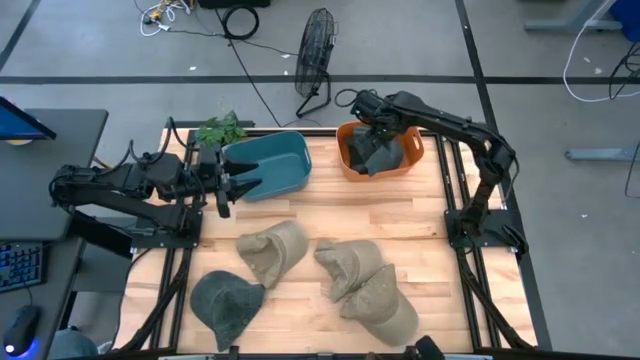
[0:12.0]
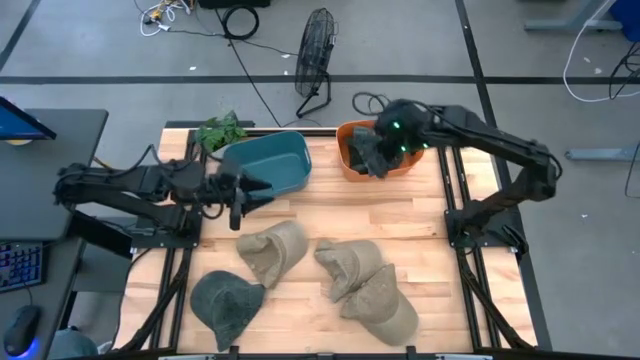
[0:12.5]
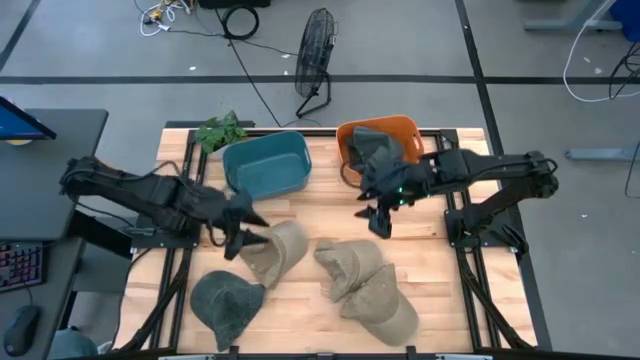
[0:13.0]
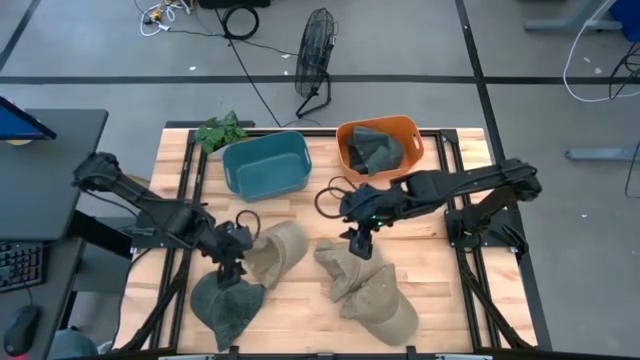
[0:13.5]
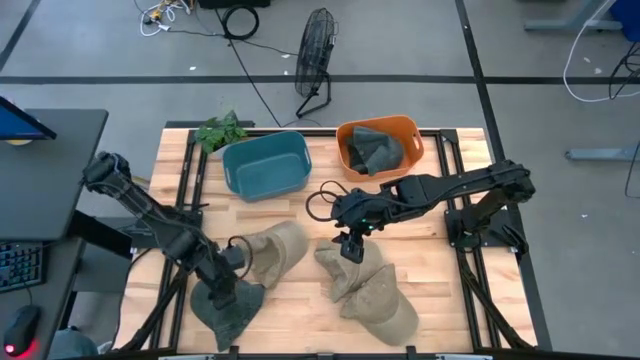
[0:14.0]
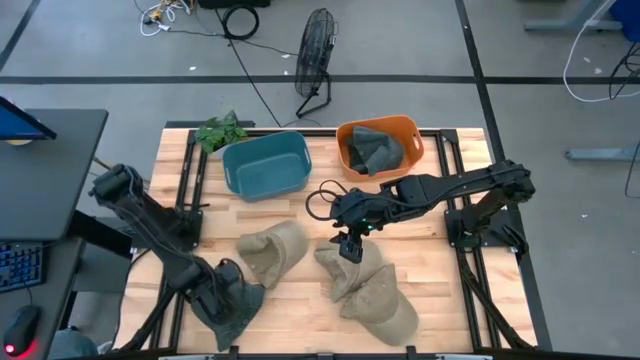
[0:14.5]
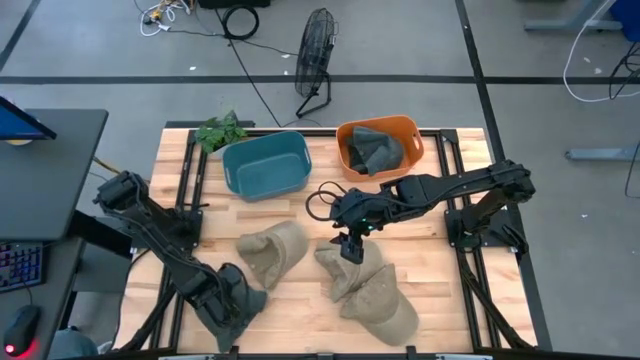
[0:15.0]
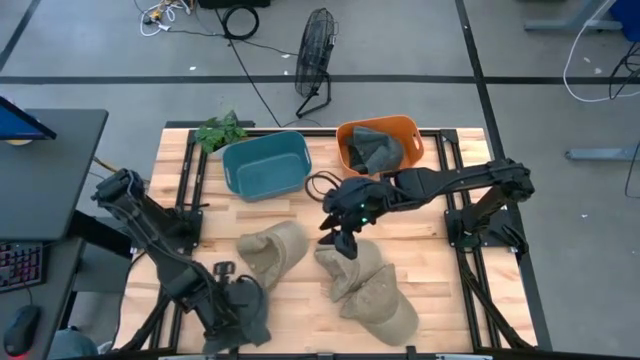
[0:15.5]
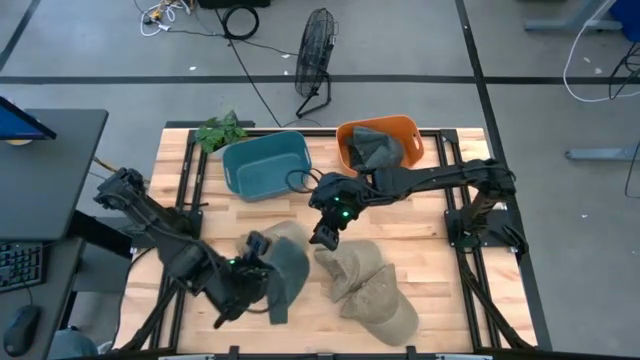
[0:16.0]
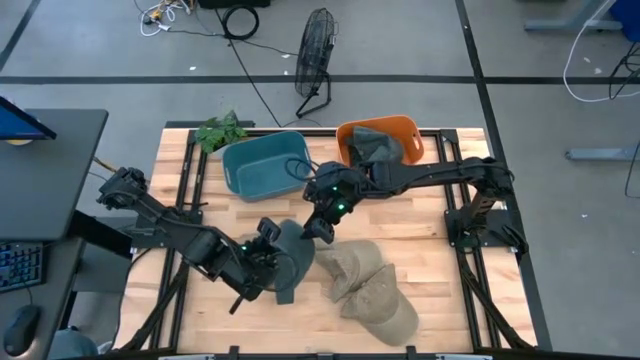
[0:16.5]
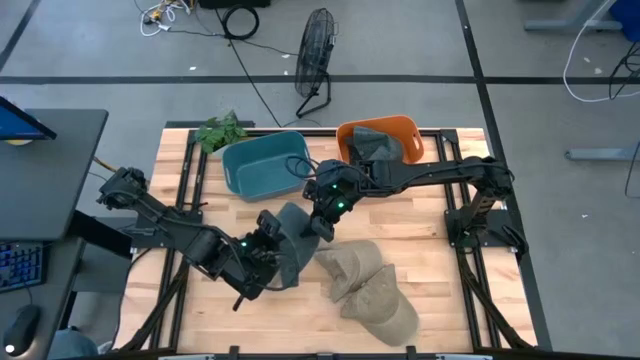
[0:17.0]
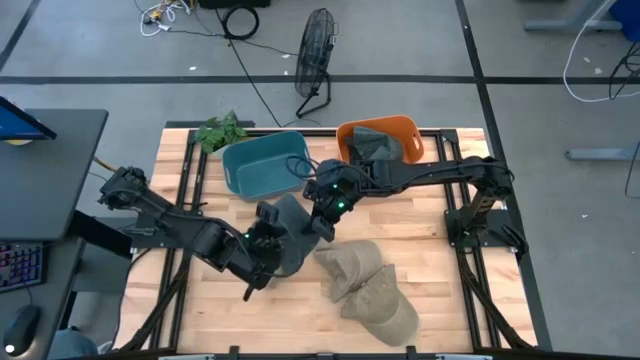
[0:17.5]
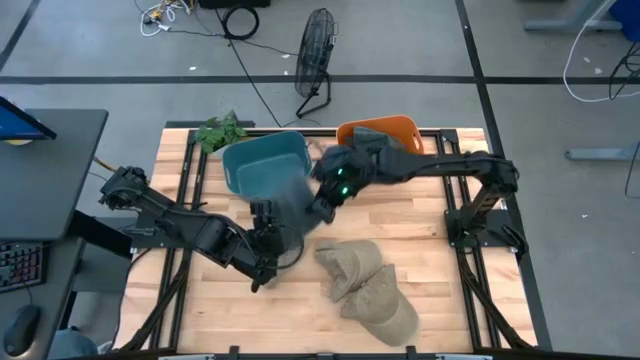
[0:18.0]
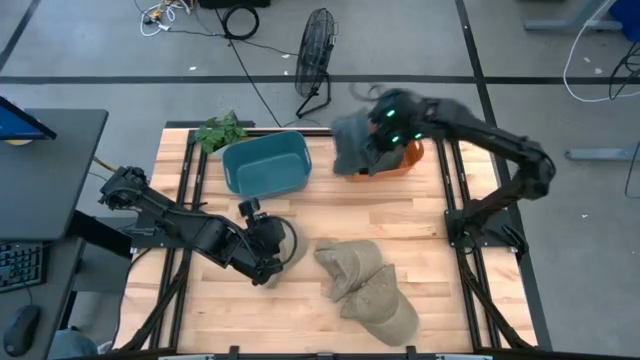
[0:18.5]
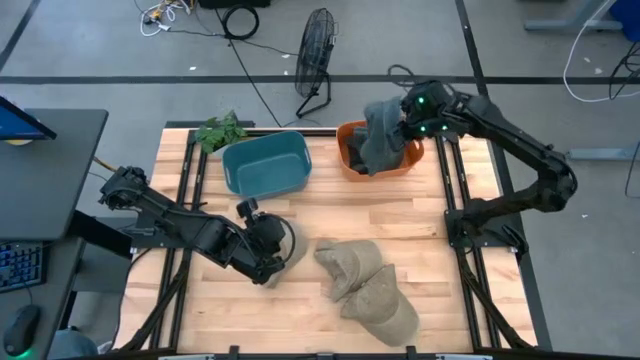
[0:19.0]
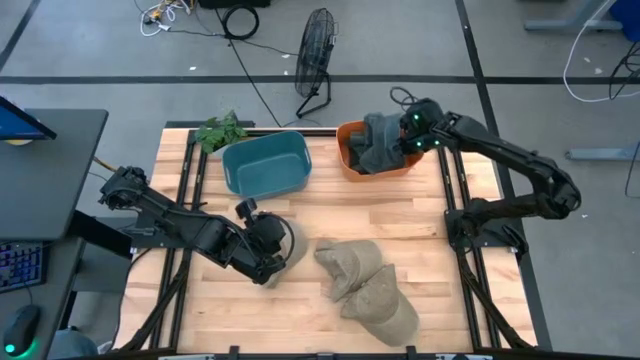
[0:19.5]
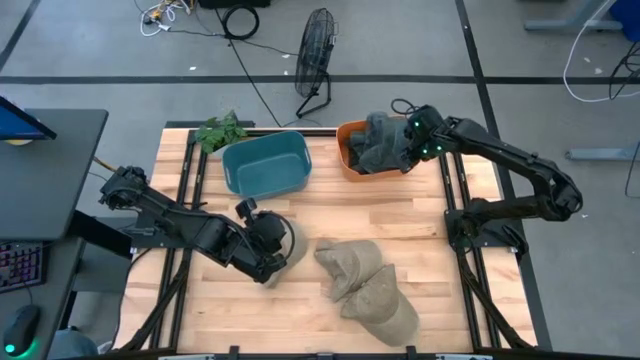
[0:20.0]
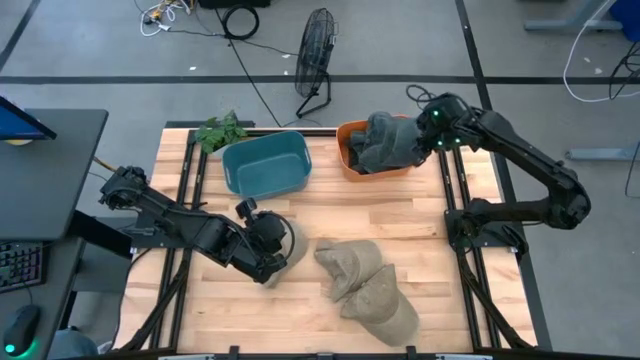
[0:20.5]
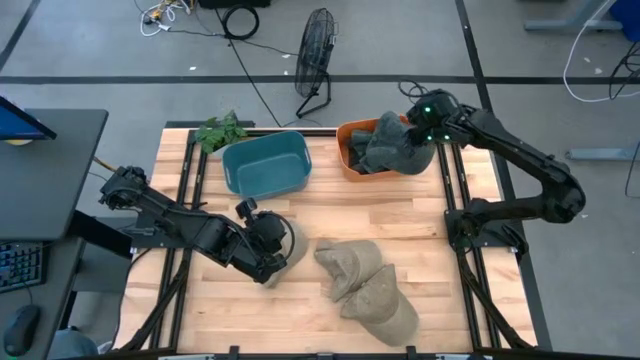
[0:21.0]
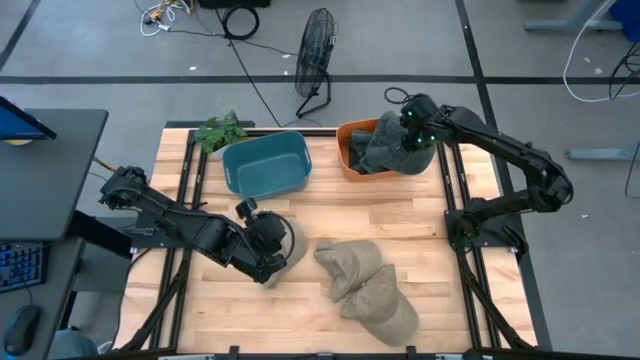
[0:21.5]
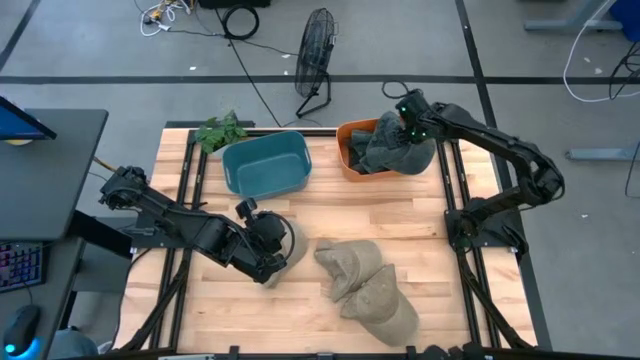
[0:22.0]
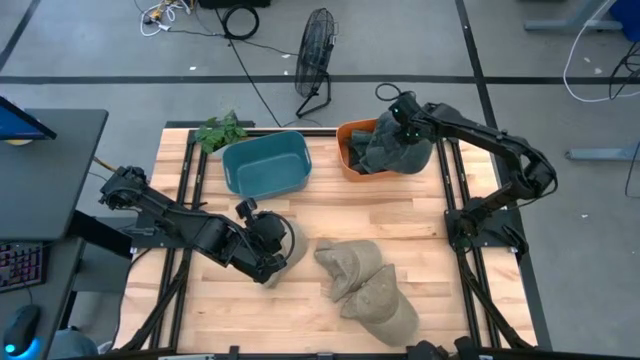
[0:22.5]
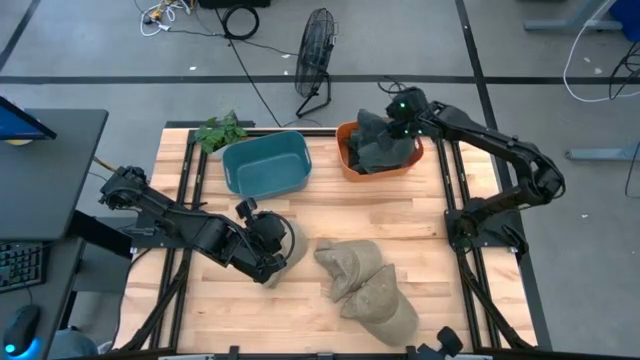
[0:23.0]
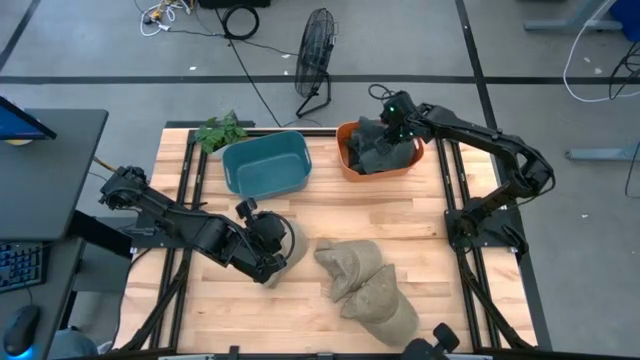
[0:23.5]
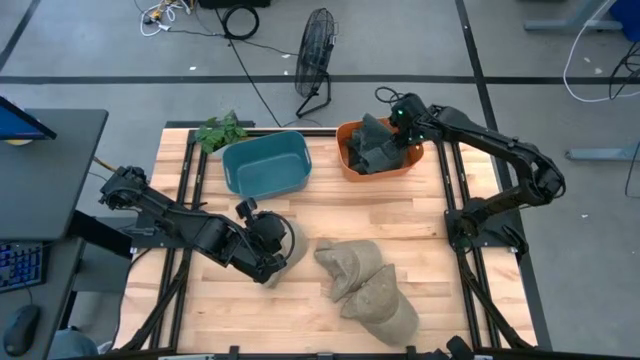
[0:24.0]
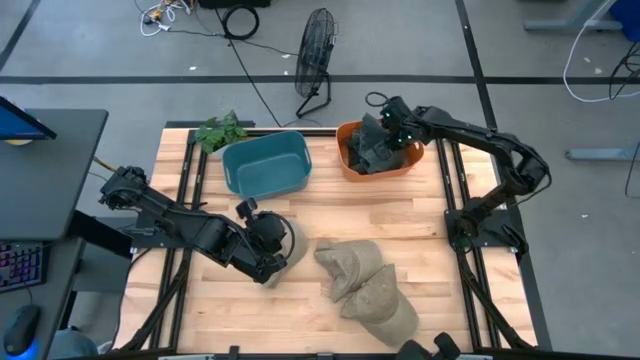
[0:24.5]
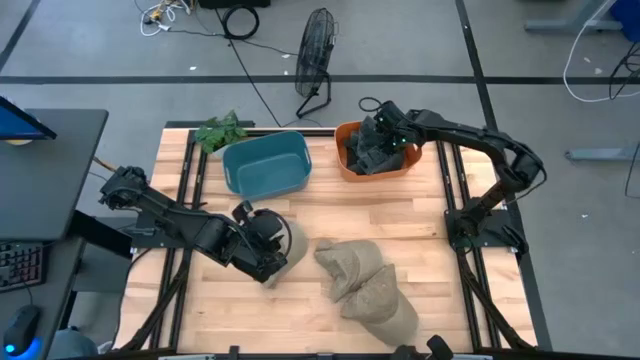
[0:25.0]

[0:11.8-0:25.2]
Task: Pick & Place hat
Put the black cap into the orange bin

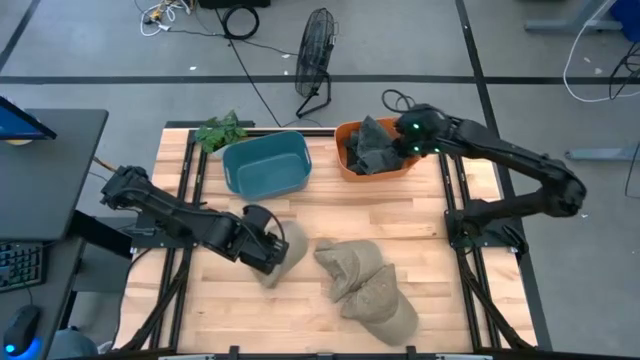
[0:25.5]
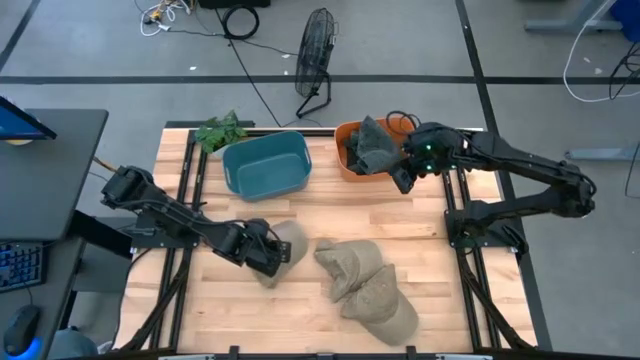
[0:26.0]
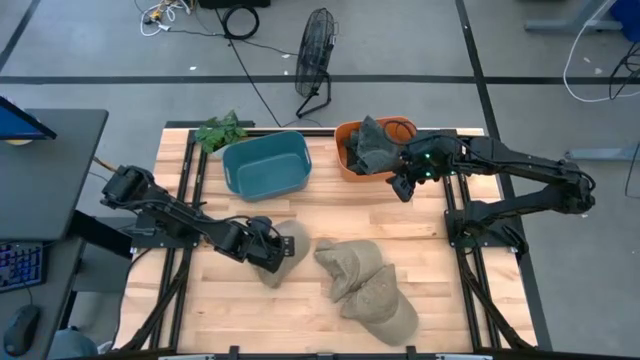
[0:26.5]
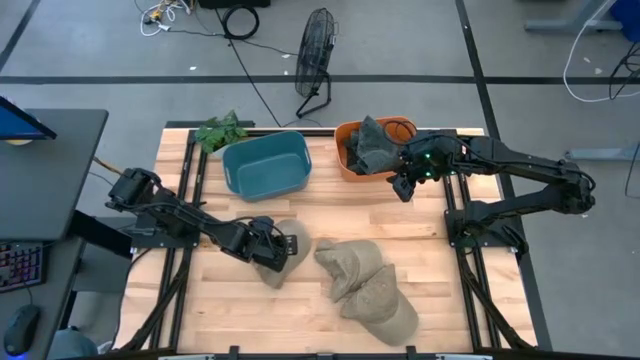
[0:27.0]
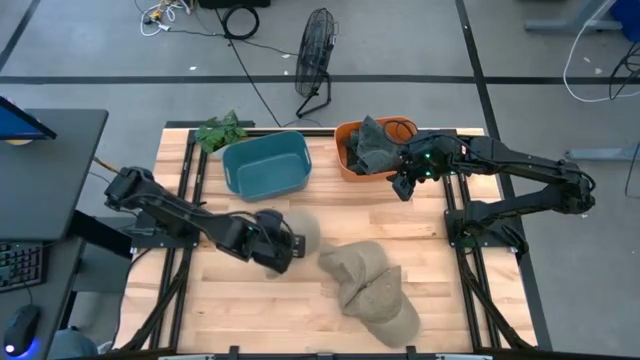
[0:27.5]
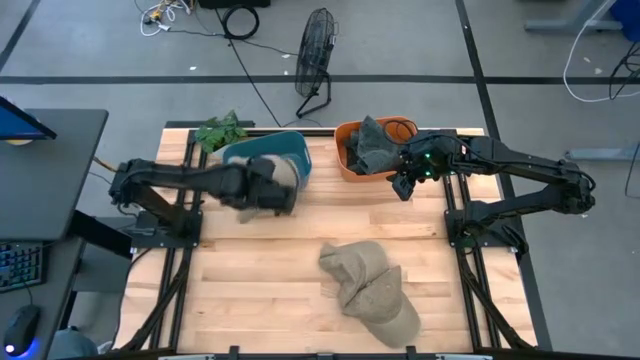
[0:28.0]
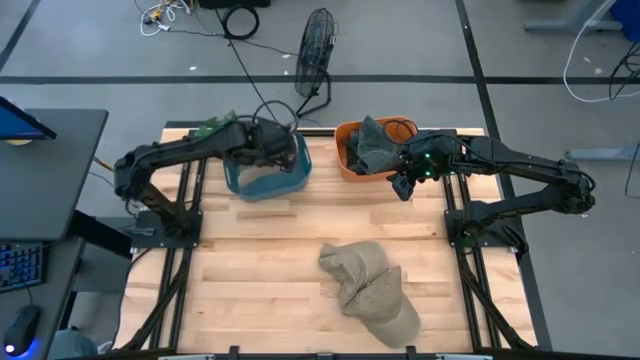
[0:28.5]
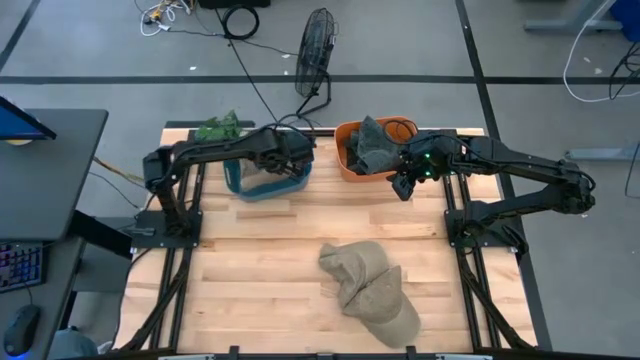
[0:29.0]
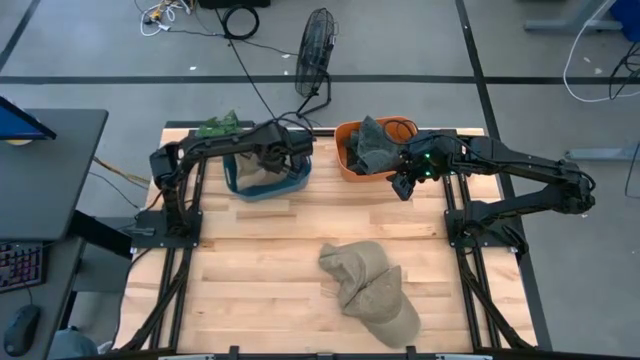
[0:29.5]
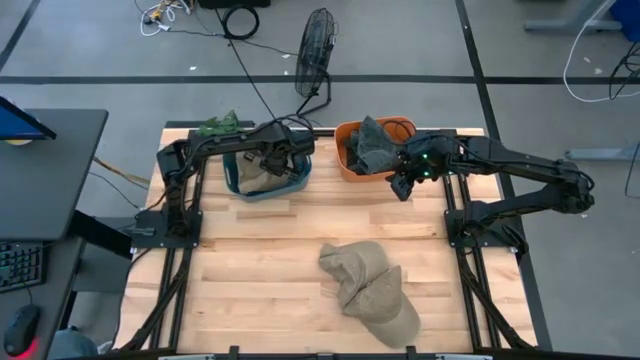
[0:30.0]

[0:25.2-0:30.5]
Put the top left brown cap into the green bin
